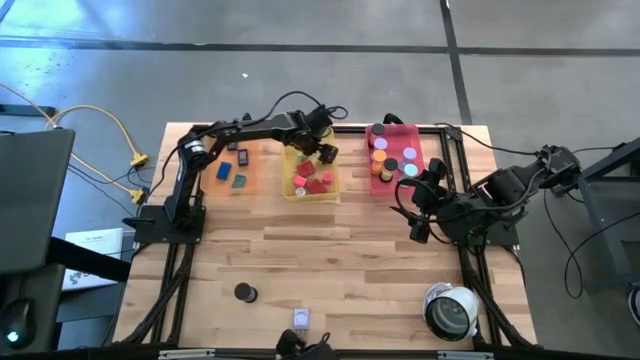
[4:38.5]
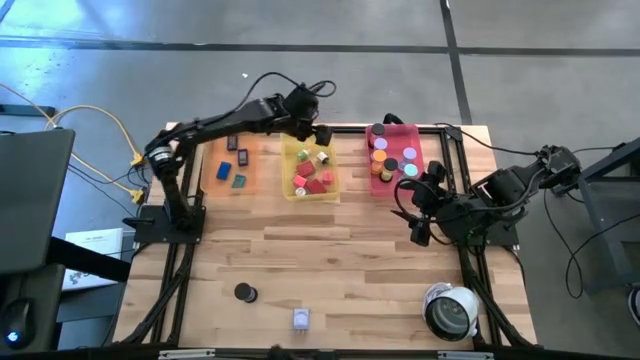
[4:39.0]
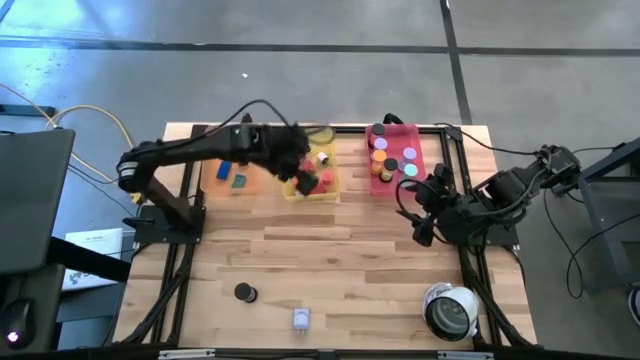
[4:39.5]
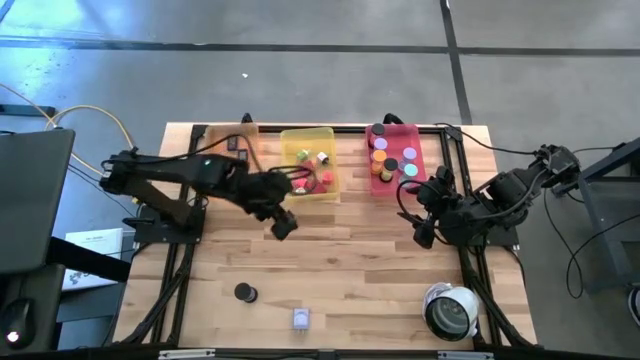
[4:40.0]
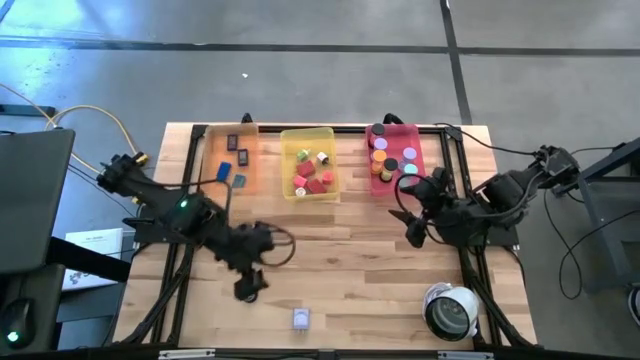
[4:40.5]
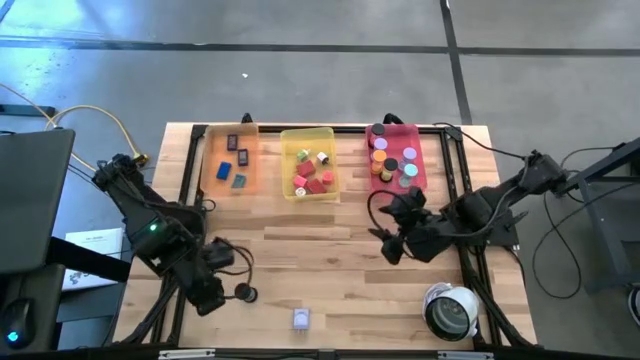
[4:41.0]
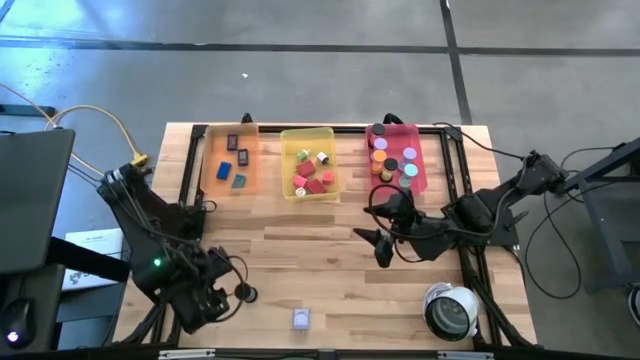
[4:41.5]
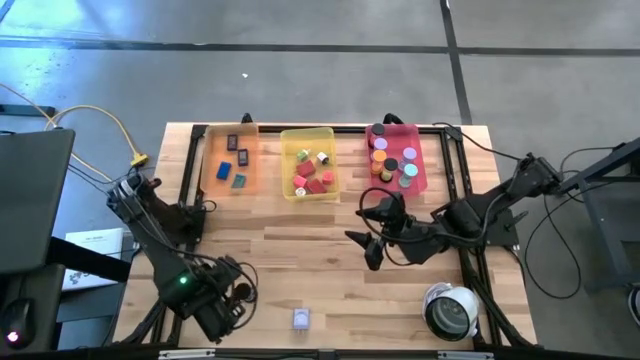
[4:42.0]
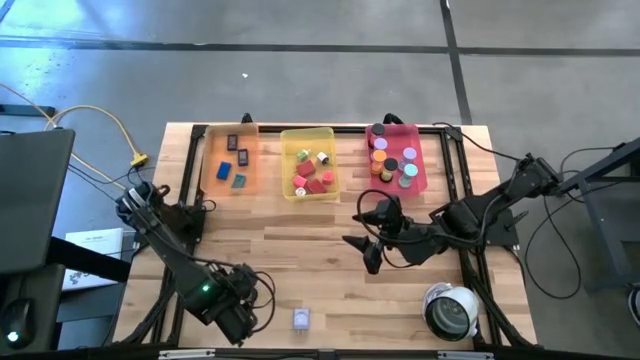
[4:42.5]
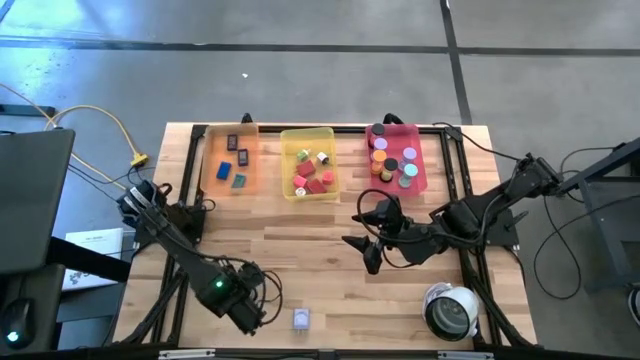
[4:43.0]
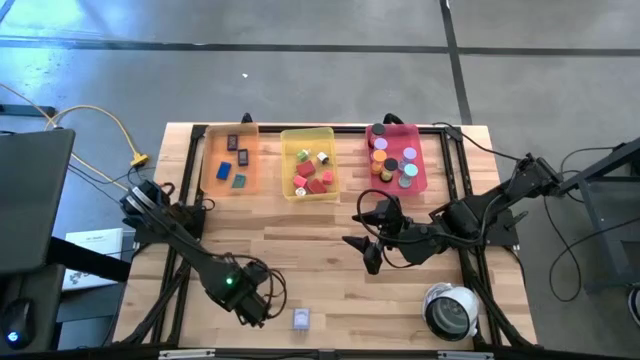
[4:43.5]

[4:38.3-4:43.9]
Task: Pick & Place Office items
Put the dark blue sand timer into the pink bin

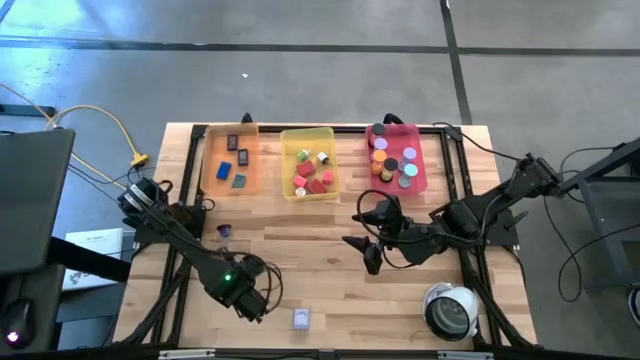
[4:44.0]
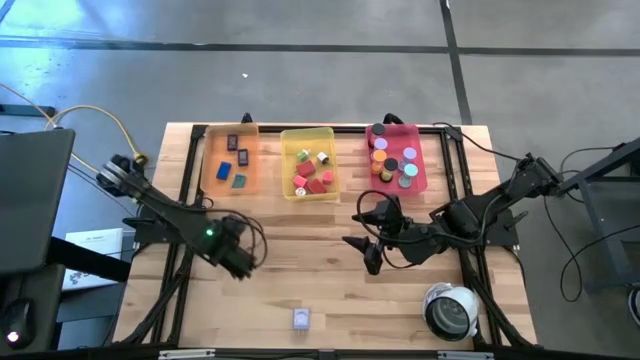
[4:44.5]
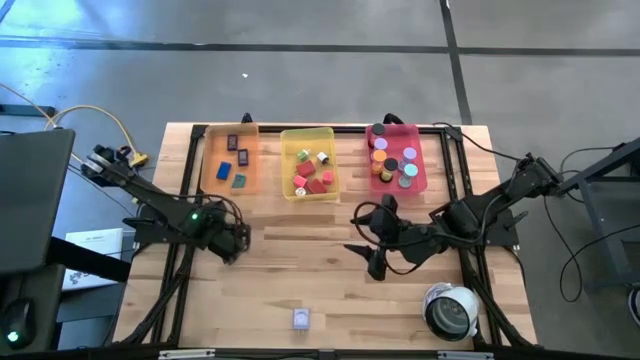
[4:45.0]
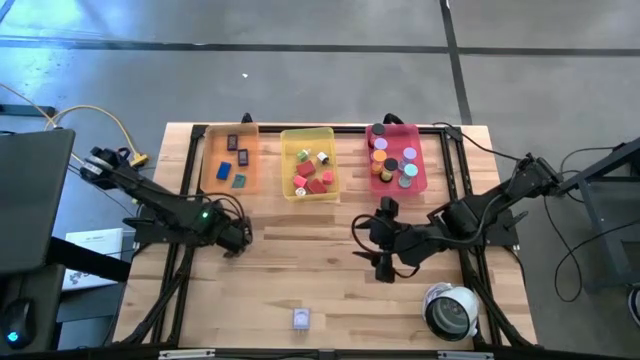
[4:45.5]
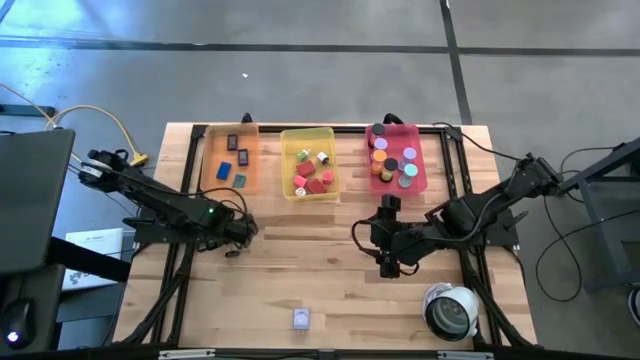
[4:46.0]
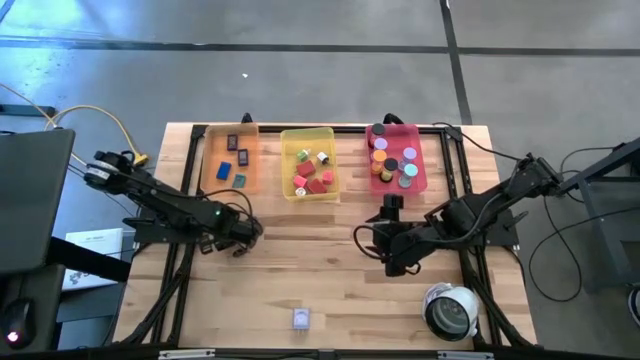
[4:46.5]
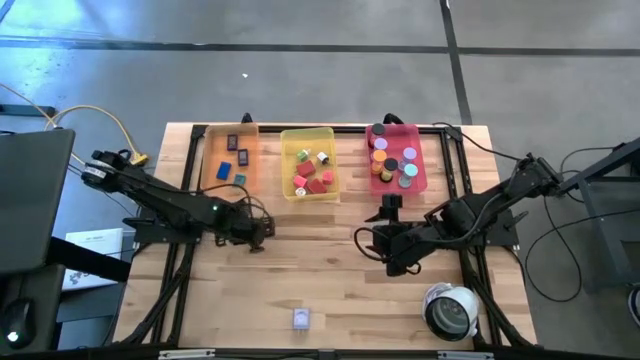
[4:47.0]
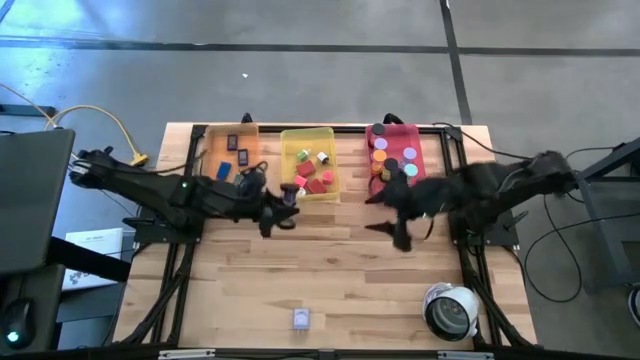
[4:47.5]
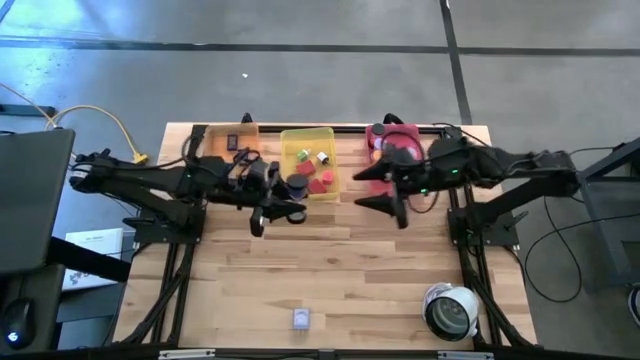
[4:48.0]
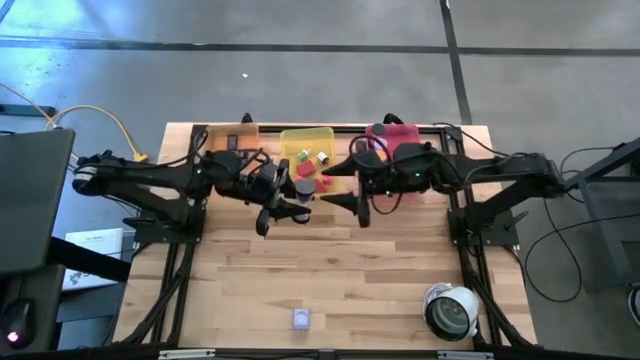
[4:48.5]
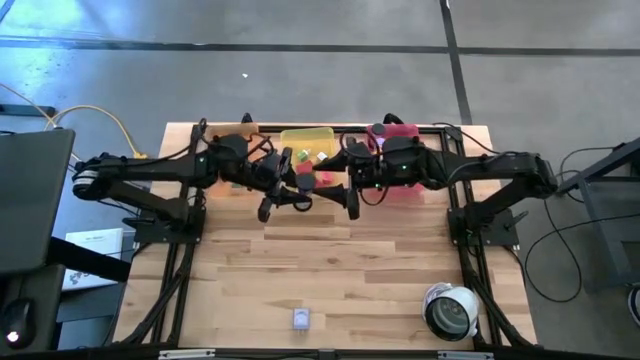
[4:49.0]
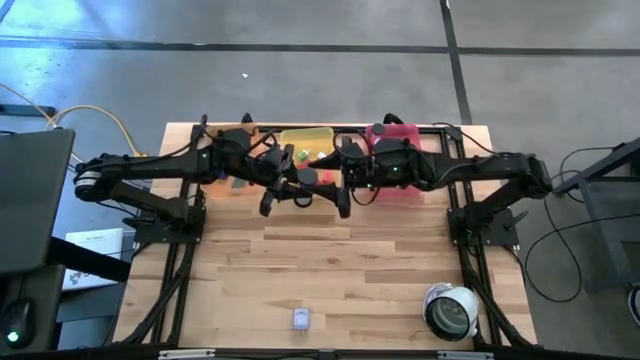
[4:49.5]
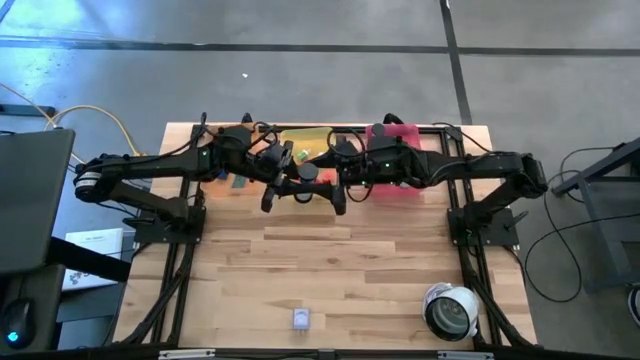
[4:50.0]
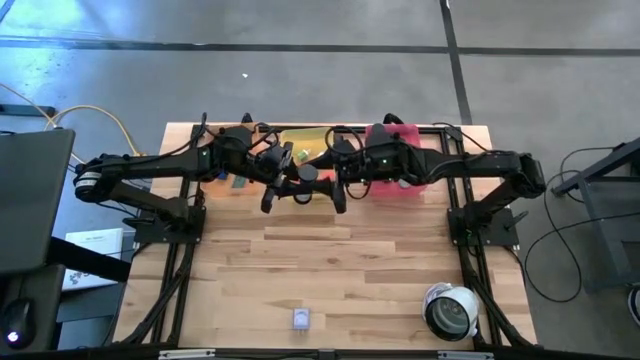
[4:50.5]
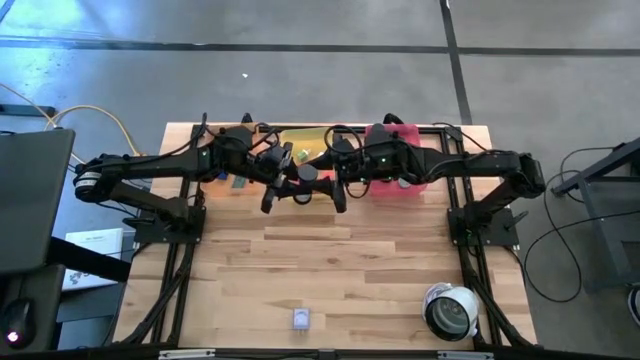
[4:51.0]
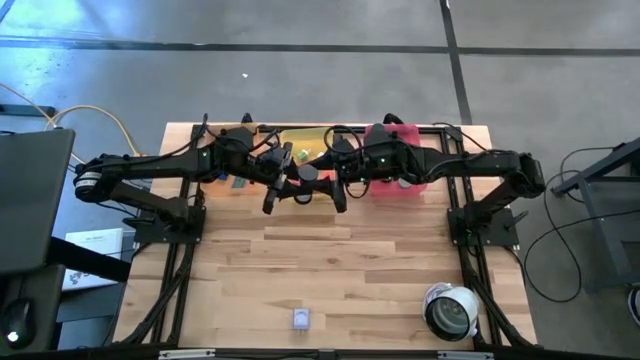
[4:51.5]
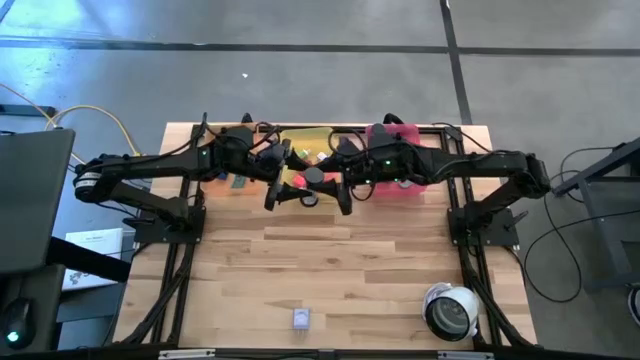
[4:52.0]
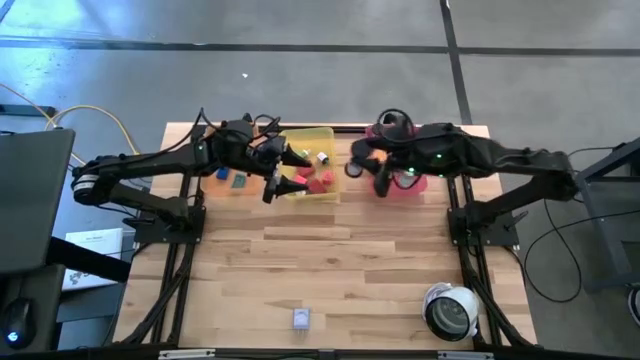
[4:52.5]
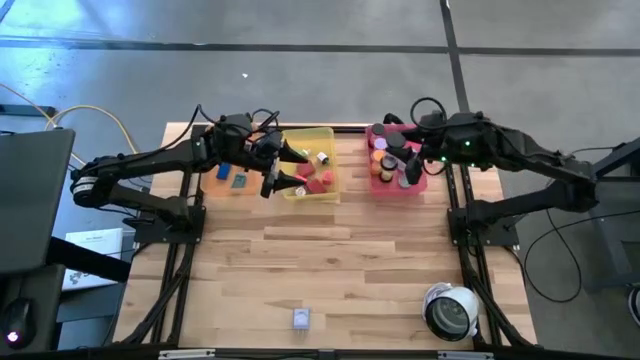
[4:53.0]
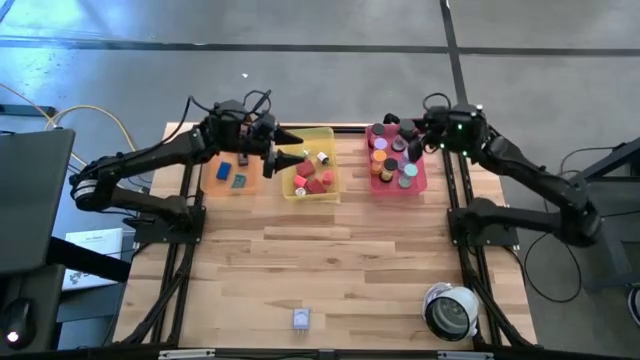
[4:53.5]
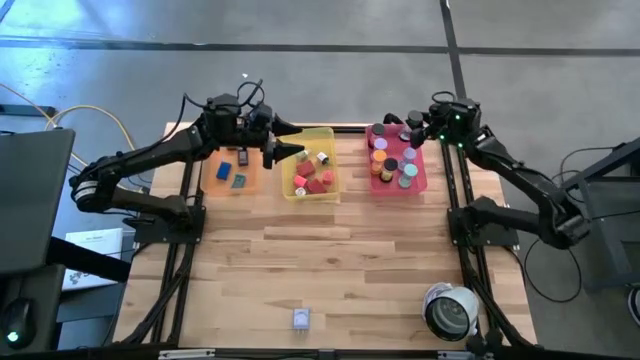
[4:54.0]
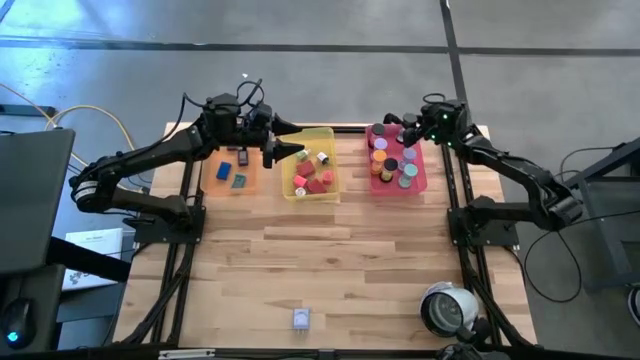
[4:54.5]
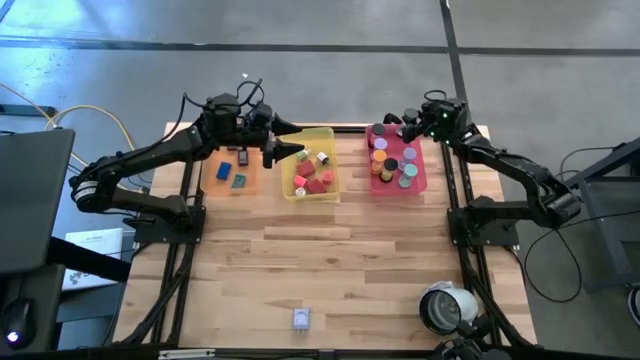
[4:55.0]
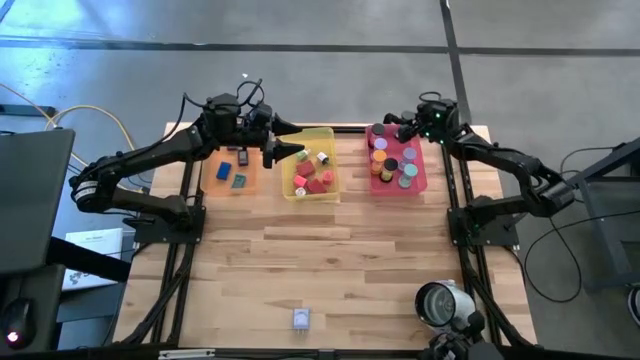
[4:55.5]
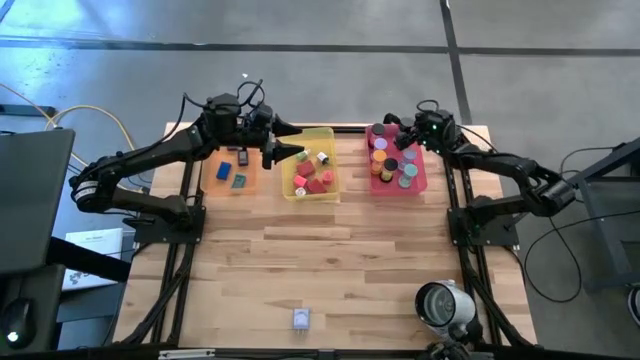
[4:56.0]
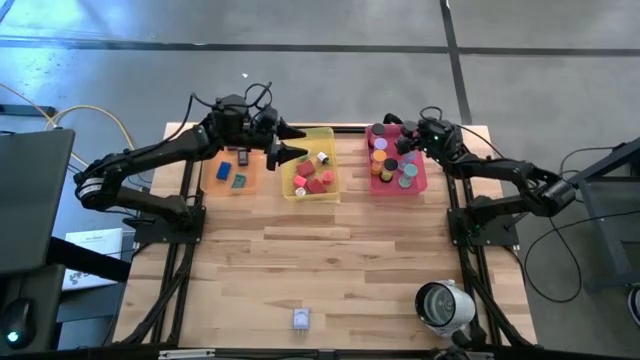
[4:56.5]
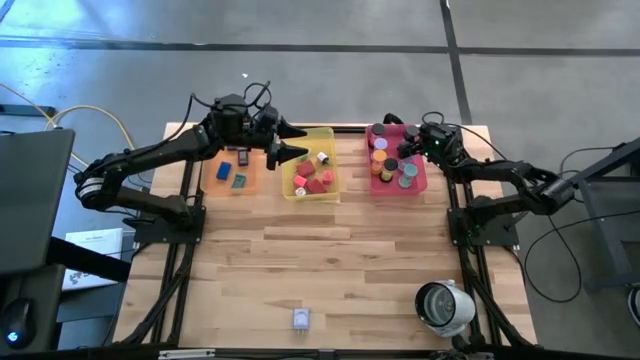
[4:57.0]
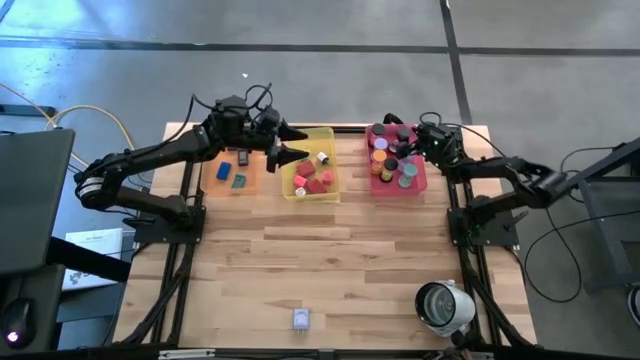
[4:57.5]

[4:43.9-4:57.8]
Put the dark blue sand timer into the pink bin
